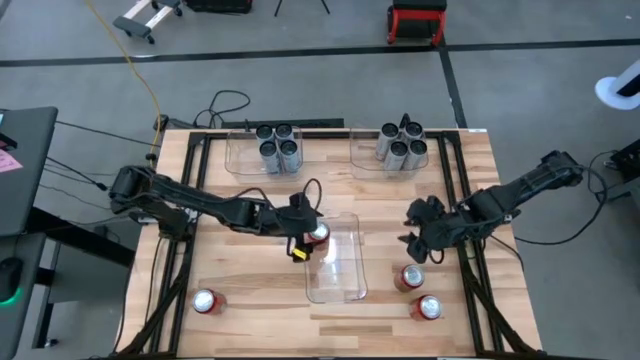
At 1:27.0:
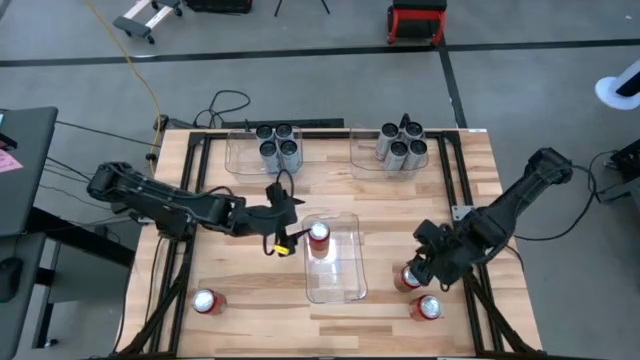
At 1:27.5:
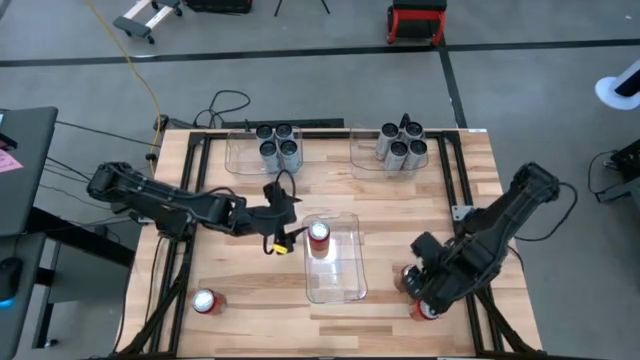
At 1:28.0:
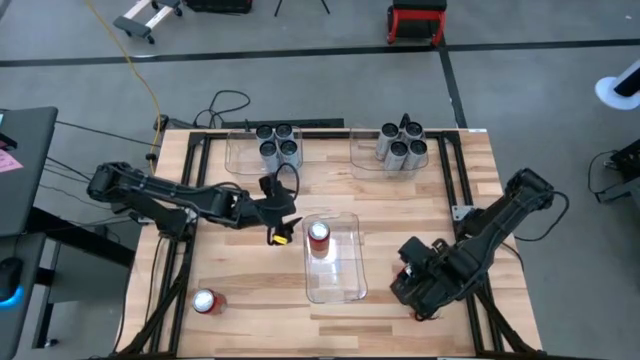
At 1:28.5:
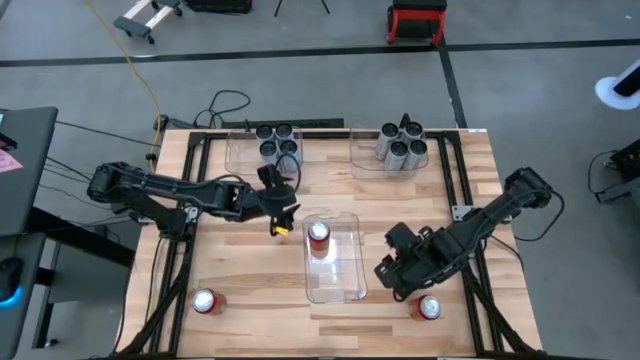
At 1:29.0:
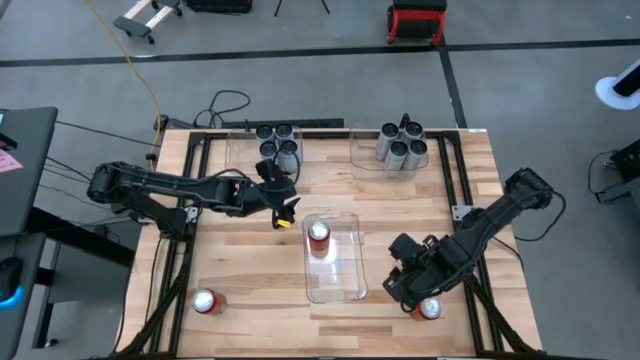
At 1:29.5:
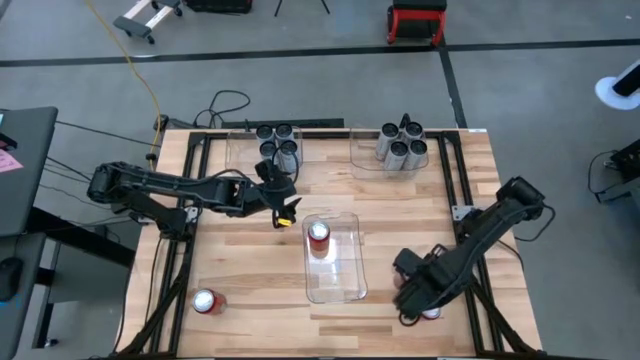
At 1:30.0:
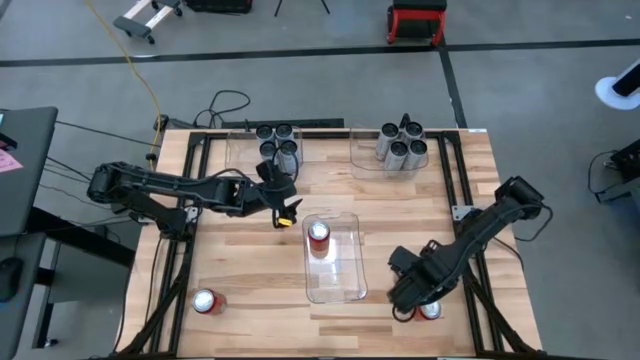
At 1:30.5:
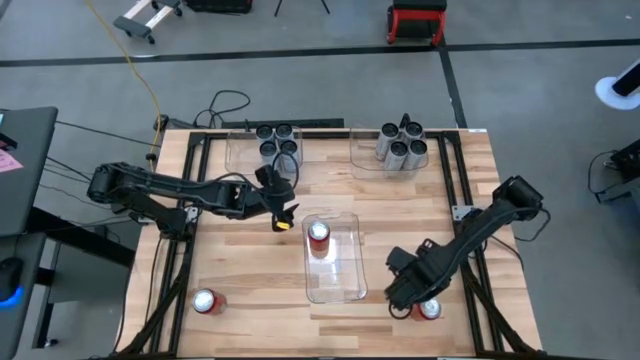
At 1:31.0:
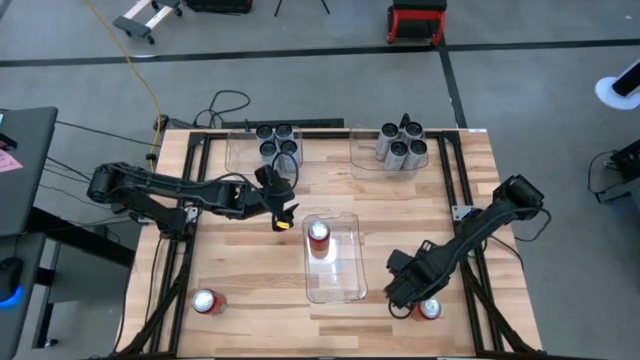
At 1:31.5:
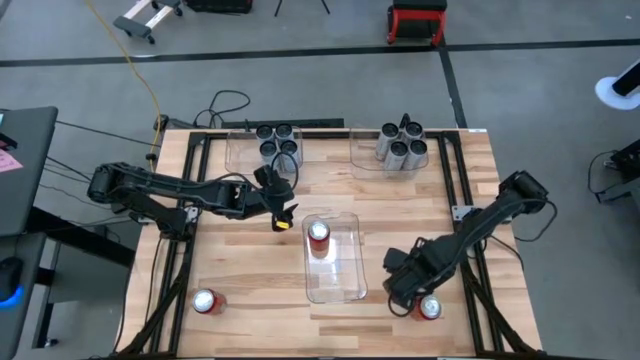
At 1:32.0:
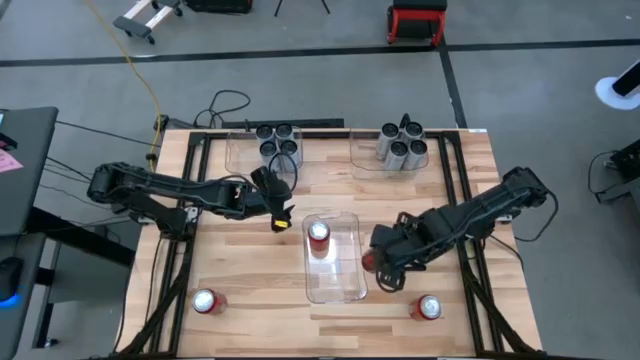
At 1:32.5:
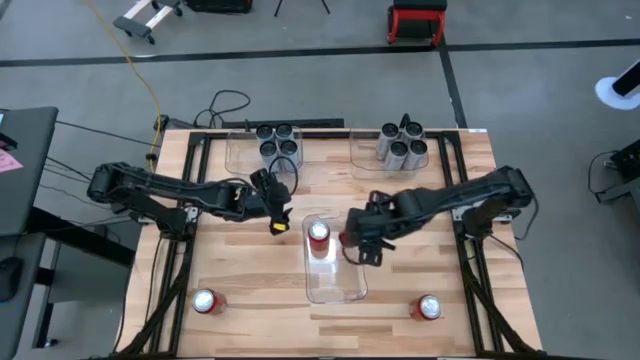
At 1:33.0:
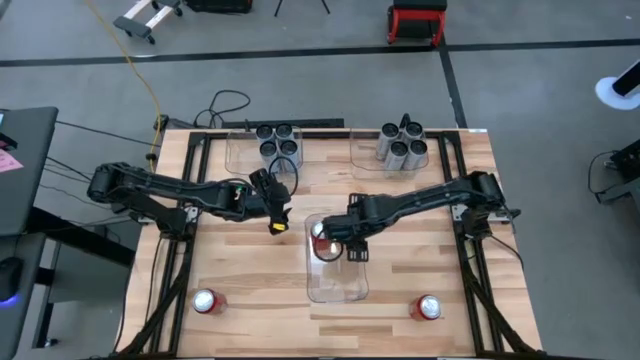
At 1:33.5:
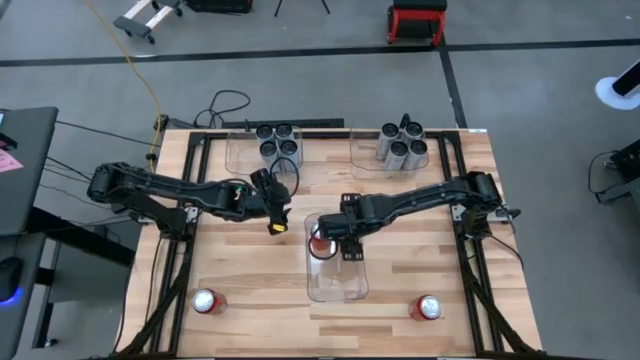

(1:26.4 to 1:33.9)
Task: Sort soda cans
Put the red-black soda can into the bottom transparent bin

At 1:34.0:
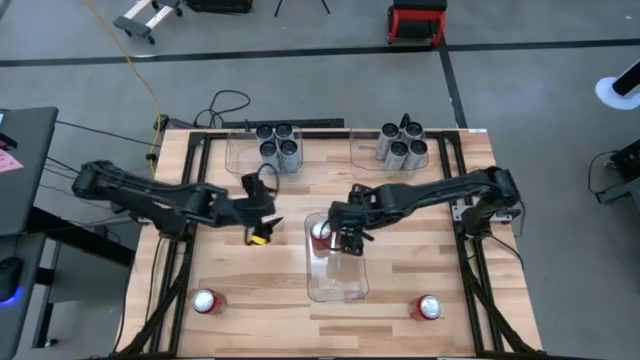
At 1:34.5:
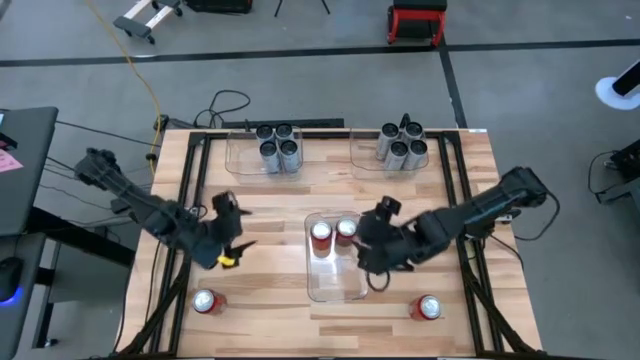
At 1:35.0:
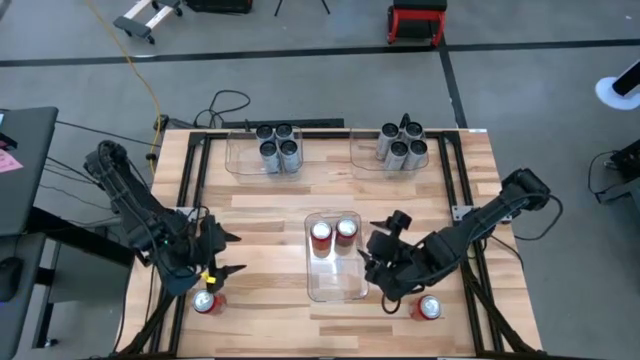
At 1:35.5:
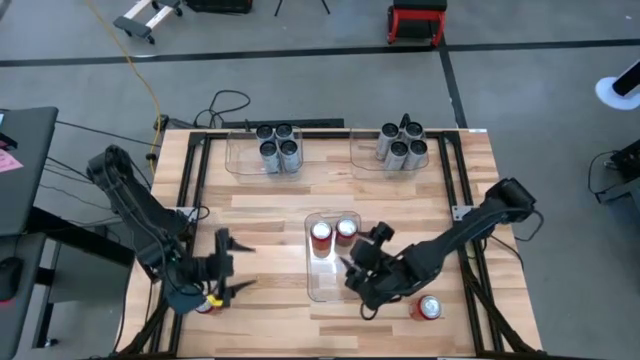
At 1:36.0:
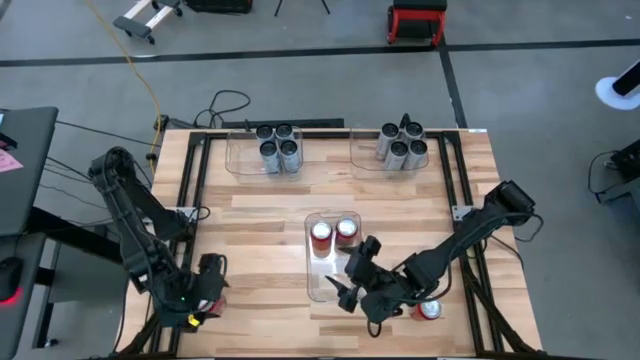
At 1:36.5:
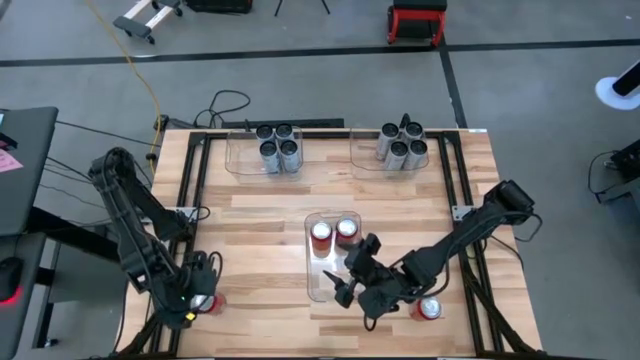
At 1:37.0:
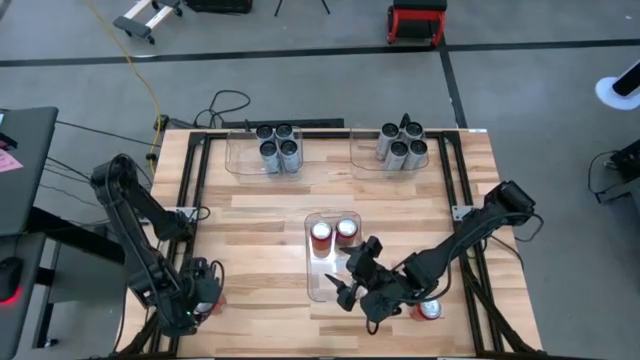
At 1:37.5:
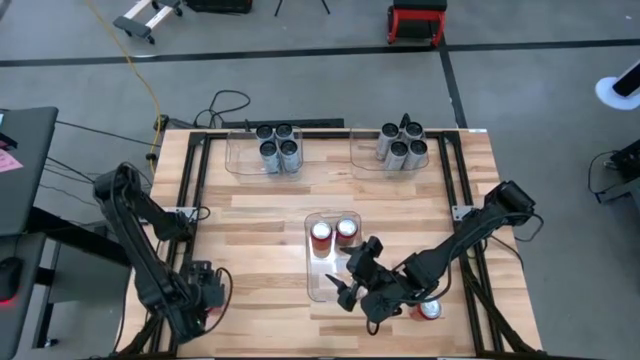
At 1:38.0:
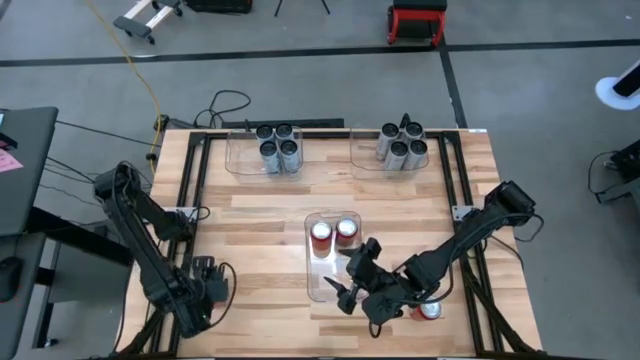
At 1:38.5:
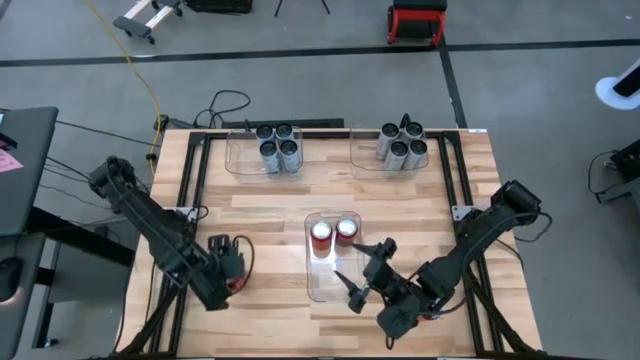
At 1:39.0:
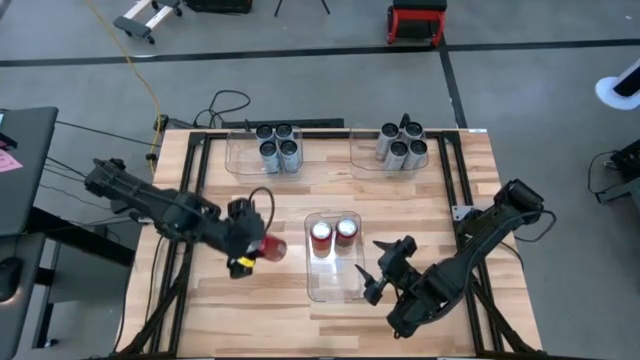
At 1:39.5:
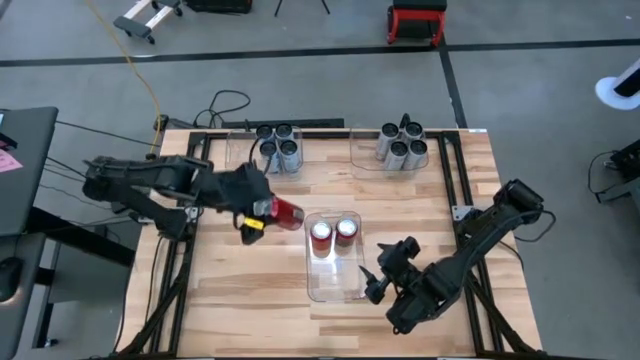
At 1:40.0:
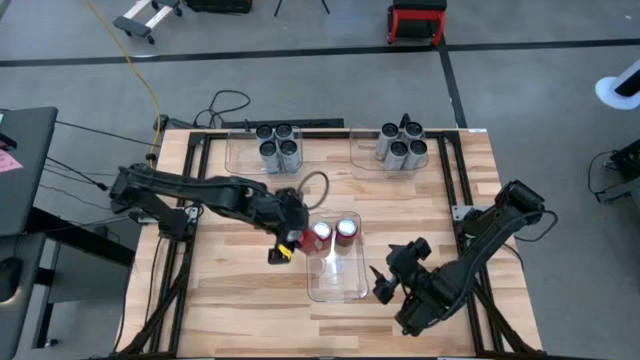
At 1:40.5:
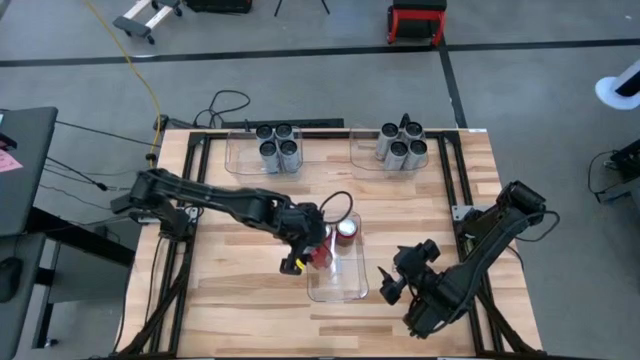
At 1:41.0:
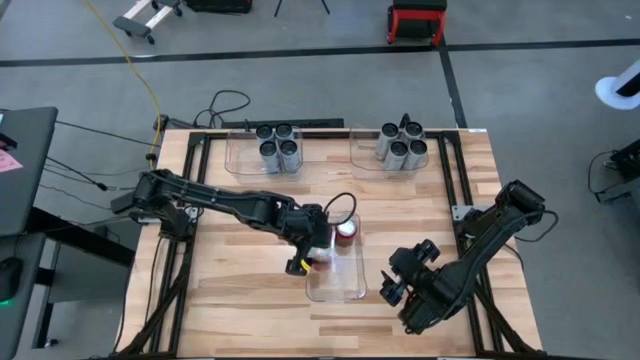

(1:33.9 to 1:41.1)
Put the red-black soda can into the bottom transparent bin

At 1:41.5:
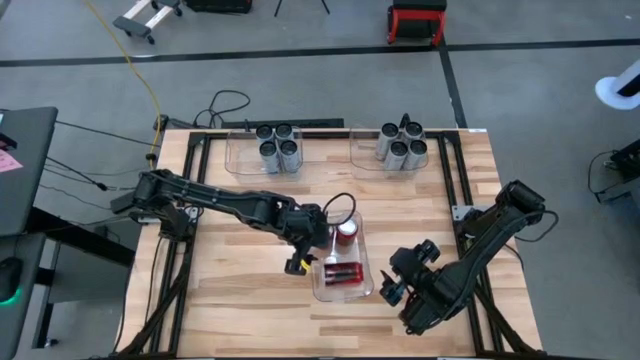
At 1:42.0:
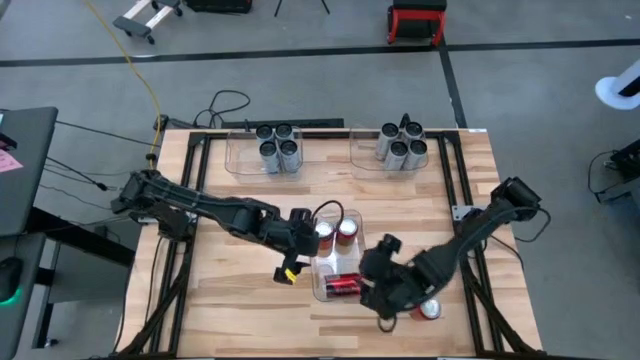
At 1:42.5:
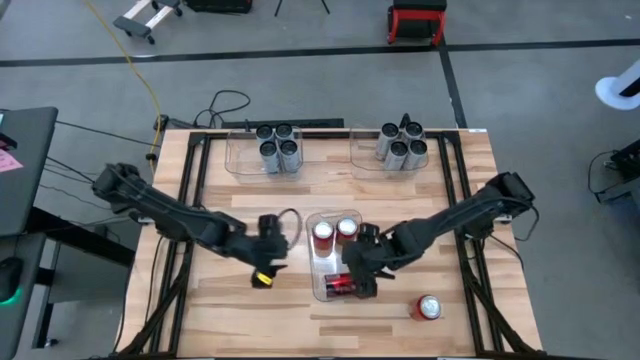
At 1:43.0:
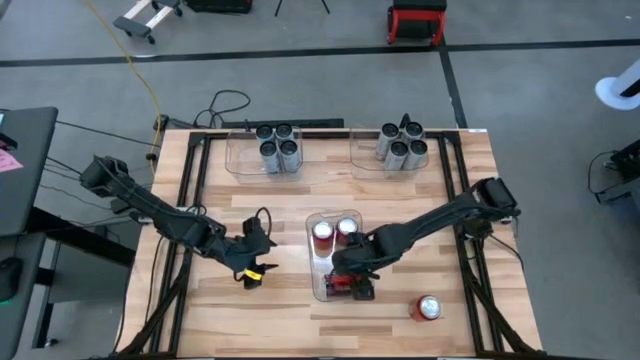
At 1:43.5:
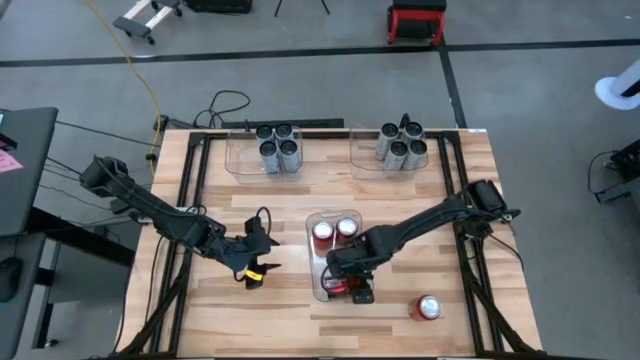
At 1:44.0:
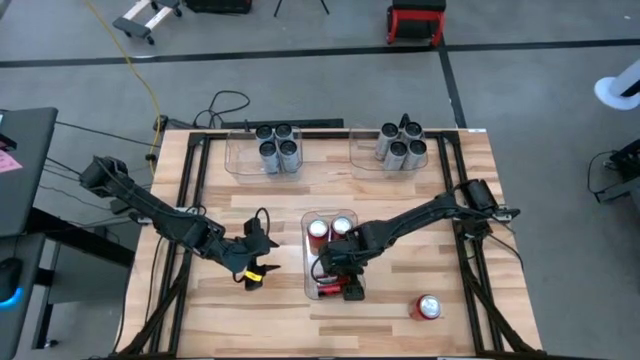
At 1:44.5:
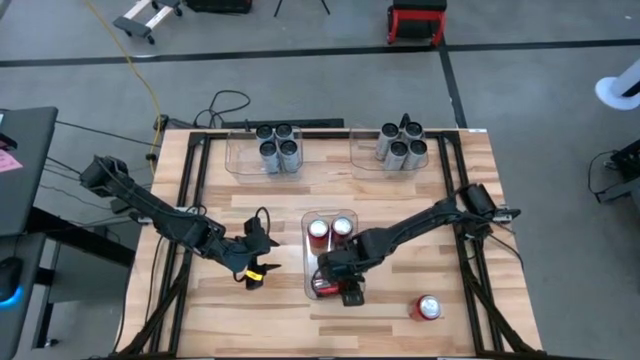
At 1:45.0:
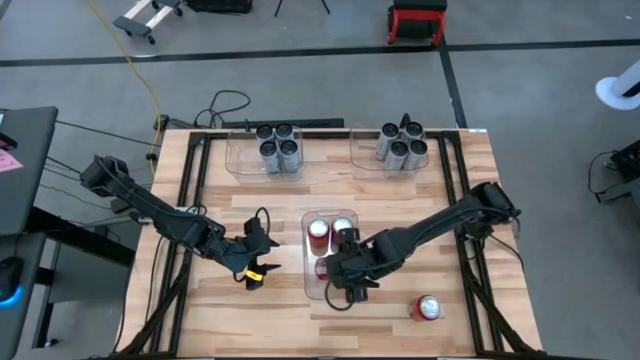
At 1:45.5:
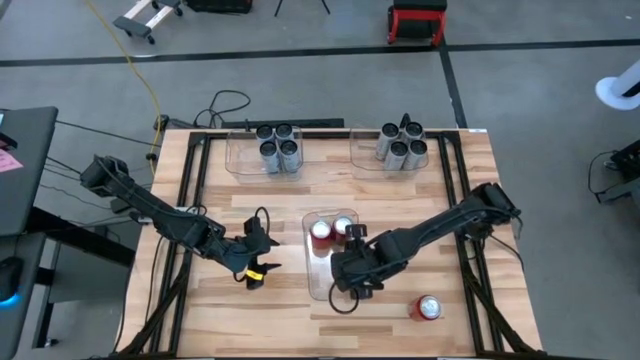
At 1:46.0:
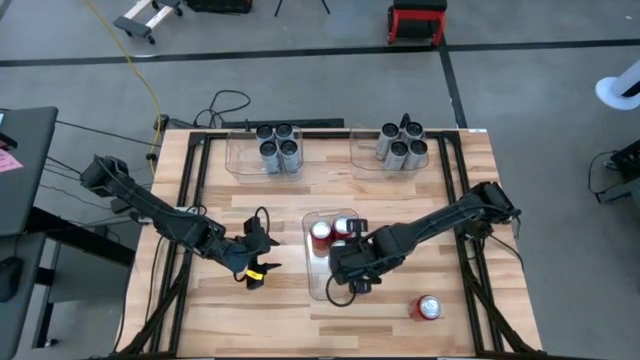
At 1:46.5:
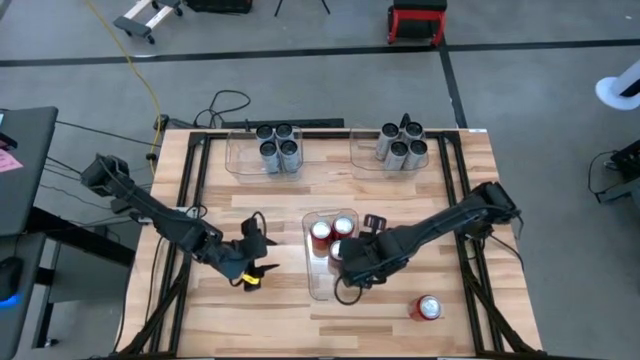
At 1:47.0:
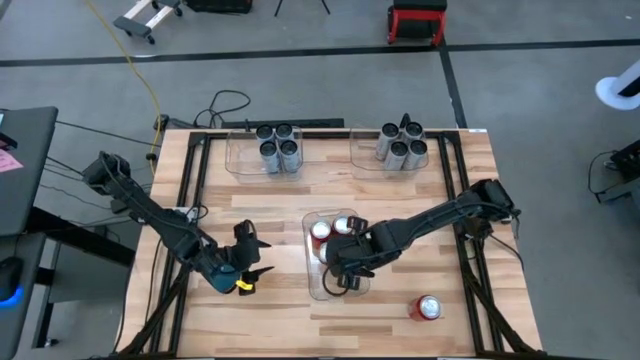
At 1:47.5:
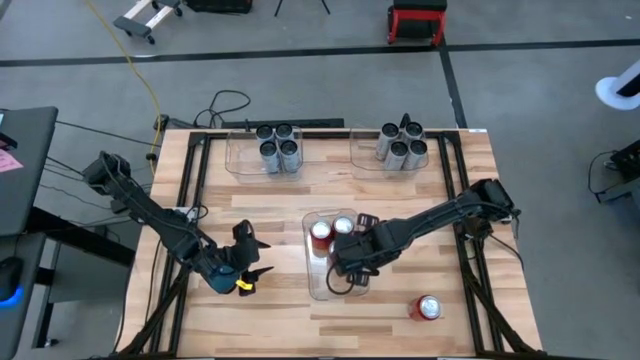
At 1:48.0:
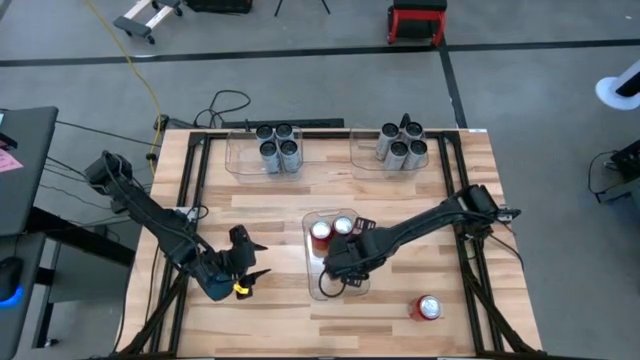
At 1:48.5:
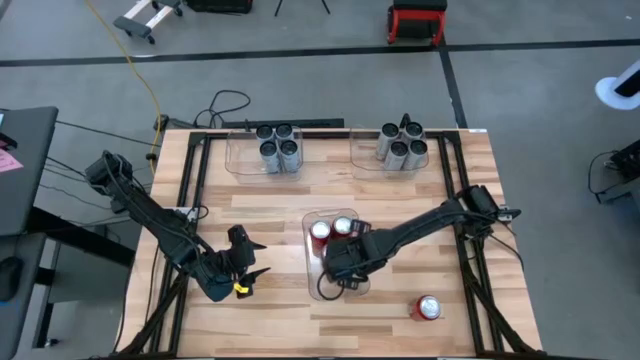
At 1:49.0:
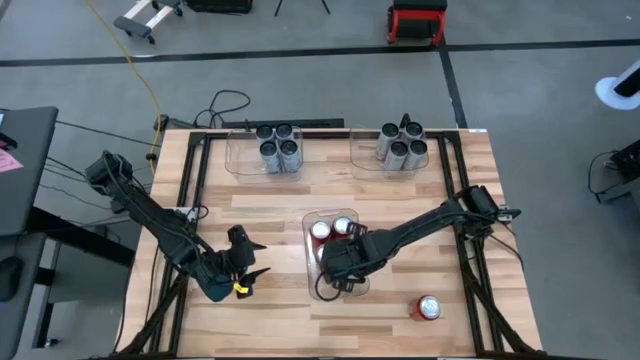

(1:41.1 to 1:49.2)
Put the red-black soda can into the bottom transparent bin
